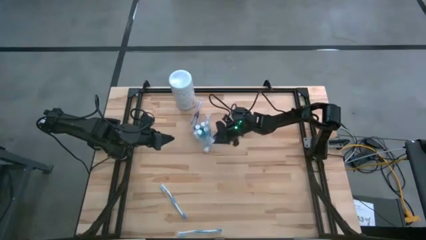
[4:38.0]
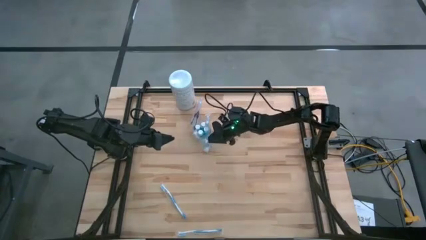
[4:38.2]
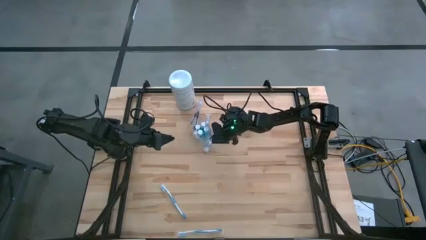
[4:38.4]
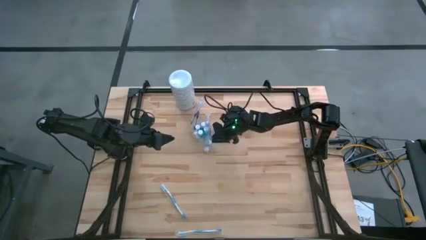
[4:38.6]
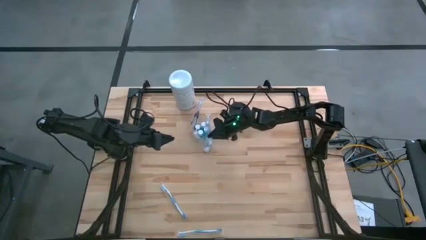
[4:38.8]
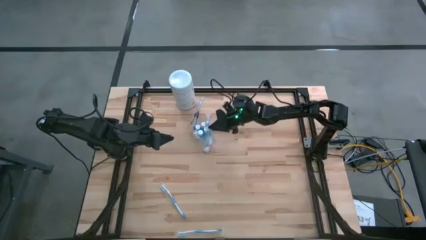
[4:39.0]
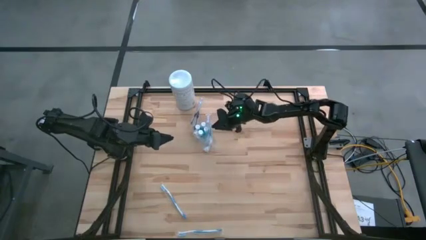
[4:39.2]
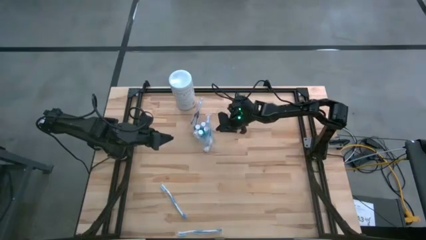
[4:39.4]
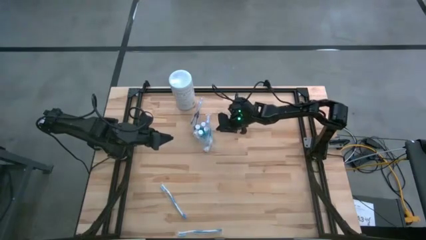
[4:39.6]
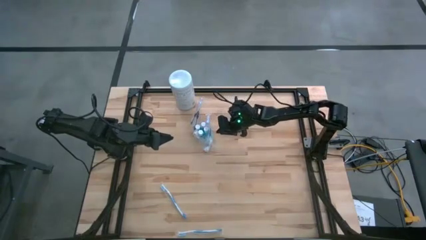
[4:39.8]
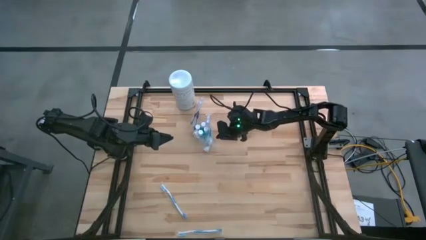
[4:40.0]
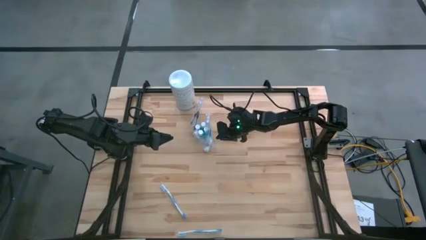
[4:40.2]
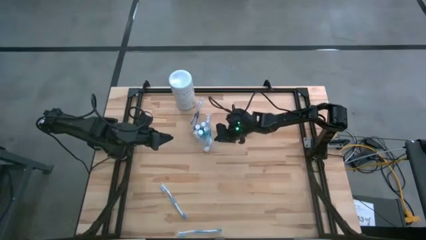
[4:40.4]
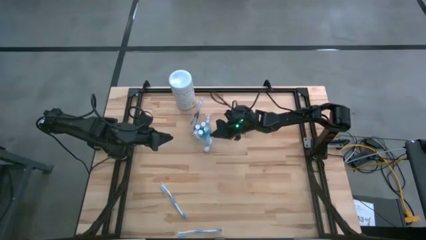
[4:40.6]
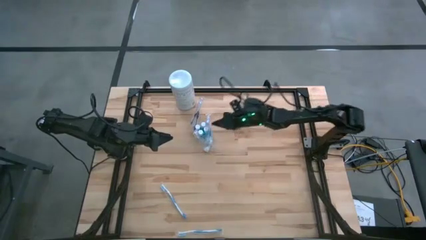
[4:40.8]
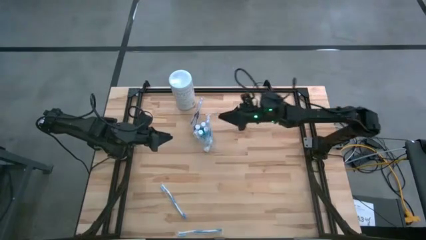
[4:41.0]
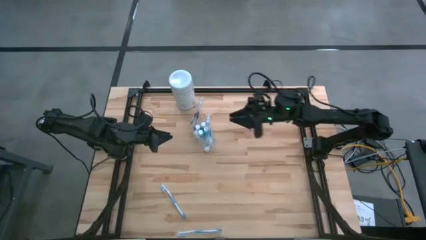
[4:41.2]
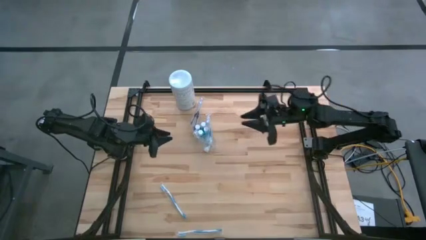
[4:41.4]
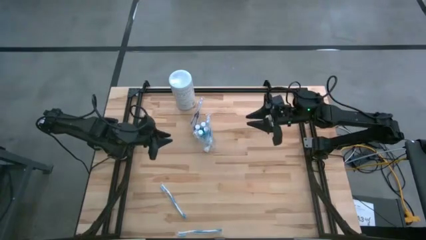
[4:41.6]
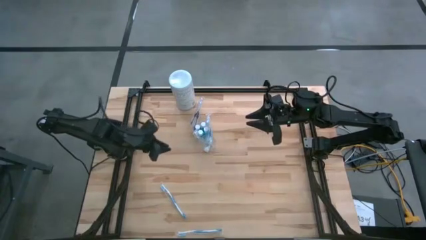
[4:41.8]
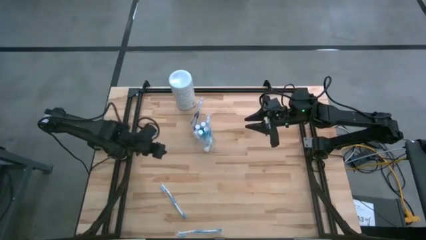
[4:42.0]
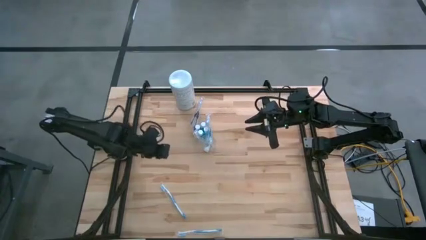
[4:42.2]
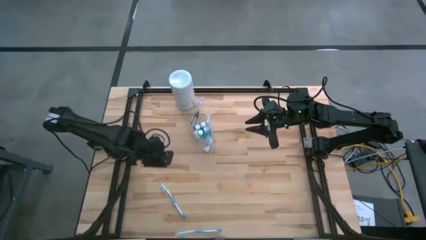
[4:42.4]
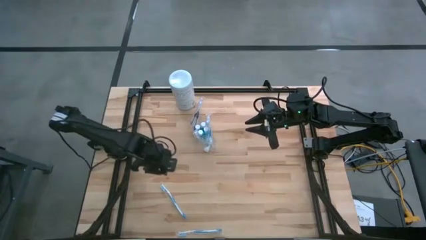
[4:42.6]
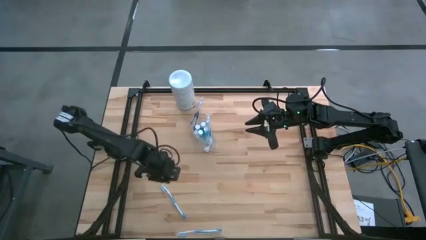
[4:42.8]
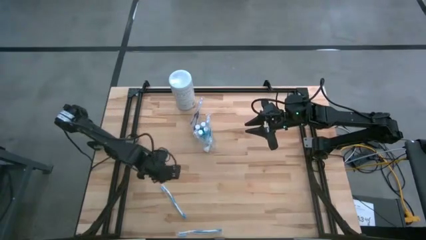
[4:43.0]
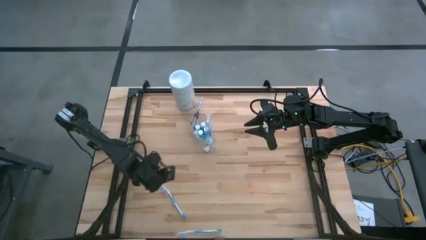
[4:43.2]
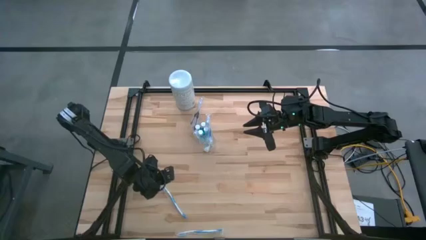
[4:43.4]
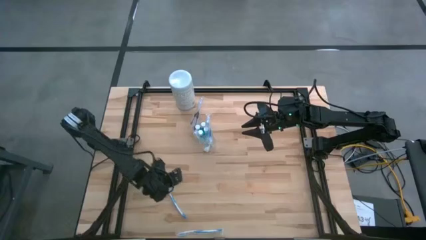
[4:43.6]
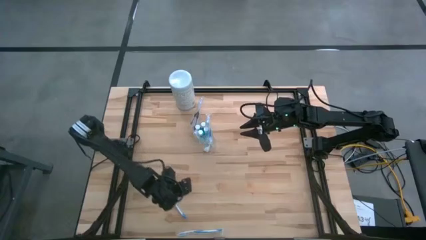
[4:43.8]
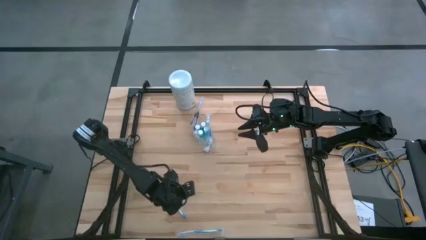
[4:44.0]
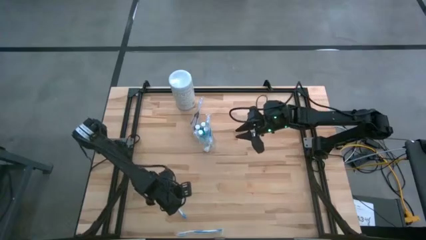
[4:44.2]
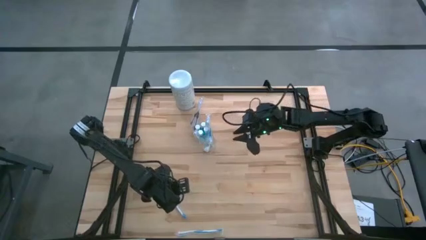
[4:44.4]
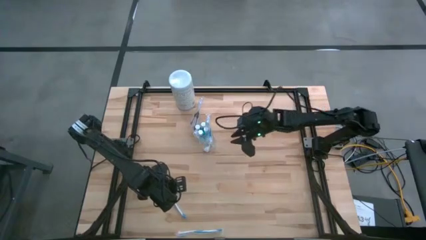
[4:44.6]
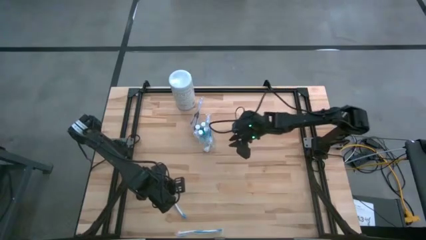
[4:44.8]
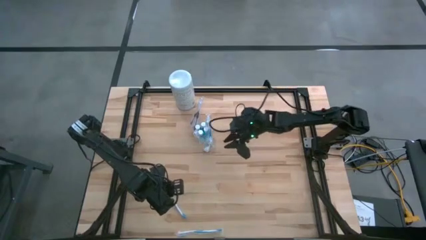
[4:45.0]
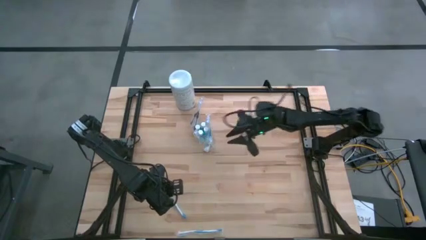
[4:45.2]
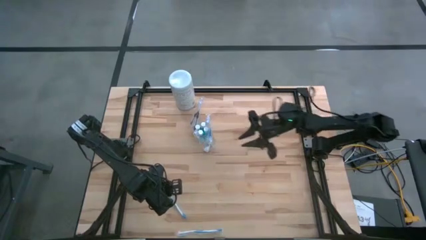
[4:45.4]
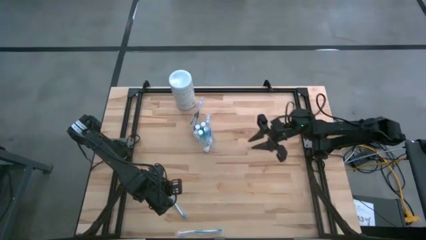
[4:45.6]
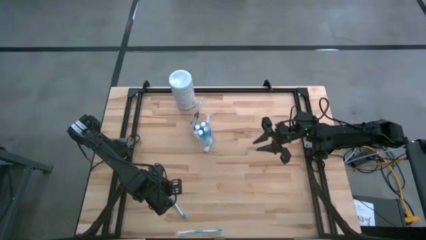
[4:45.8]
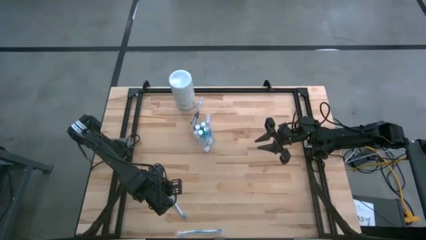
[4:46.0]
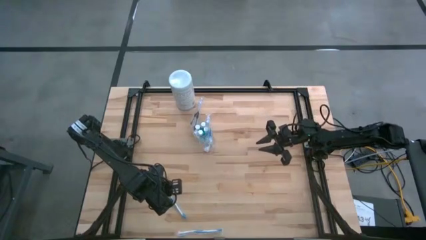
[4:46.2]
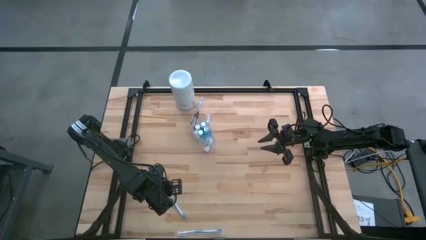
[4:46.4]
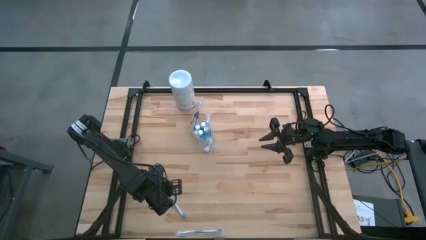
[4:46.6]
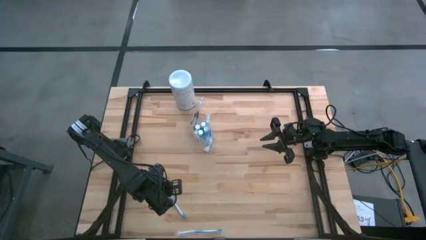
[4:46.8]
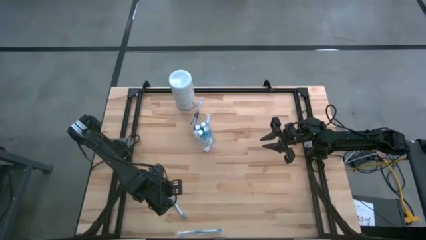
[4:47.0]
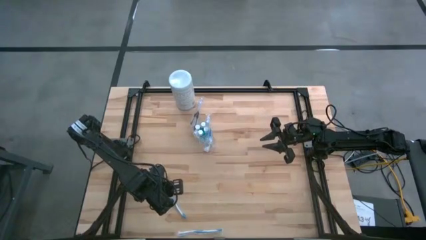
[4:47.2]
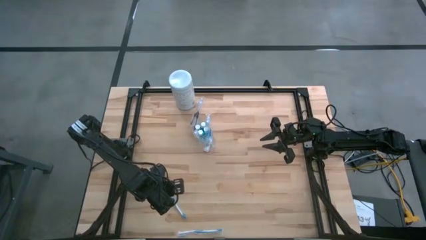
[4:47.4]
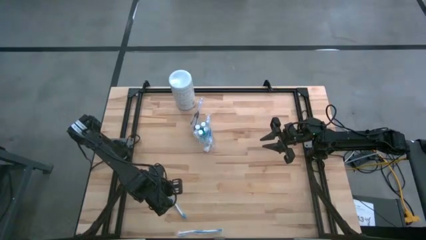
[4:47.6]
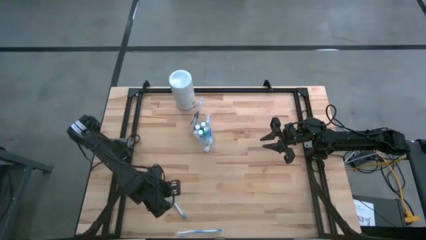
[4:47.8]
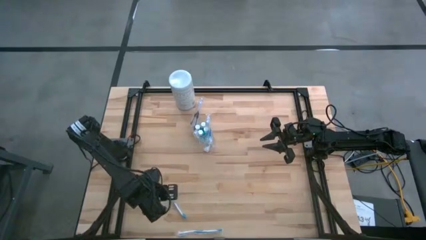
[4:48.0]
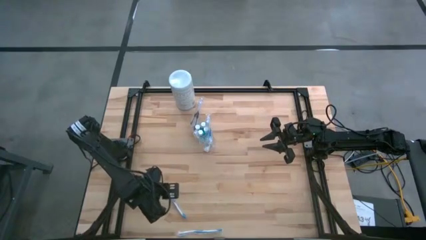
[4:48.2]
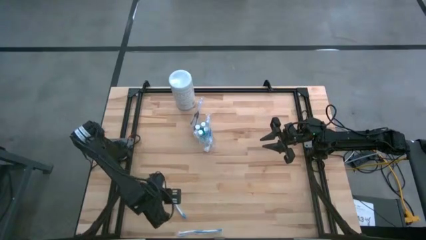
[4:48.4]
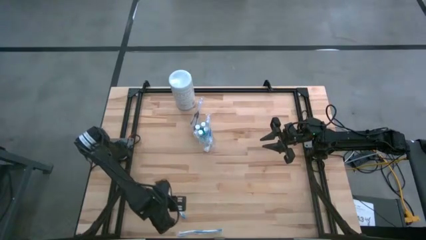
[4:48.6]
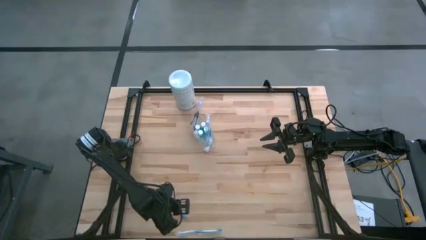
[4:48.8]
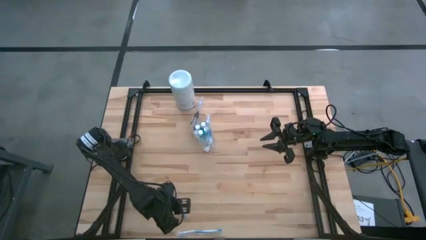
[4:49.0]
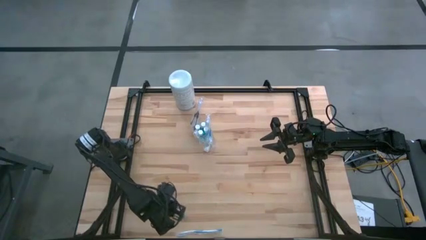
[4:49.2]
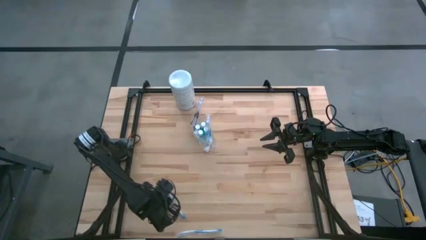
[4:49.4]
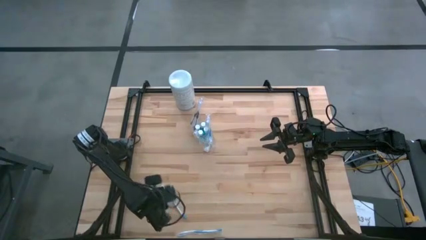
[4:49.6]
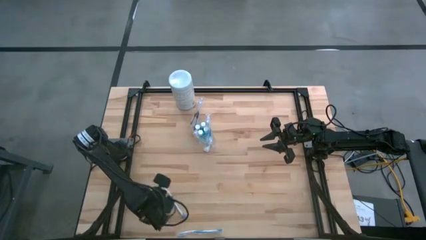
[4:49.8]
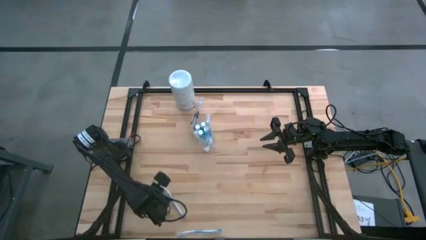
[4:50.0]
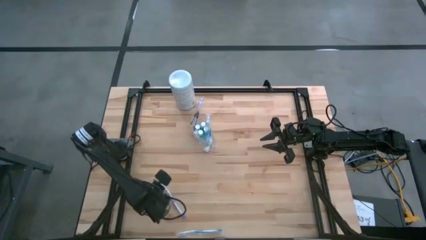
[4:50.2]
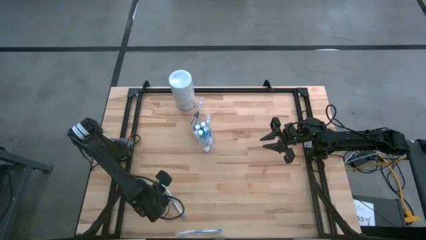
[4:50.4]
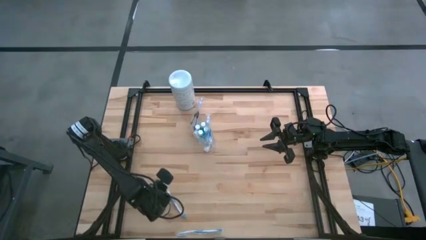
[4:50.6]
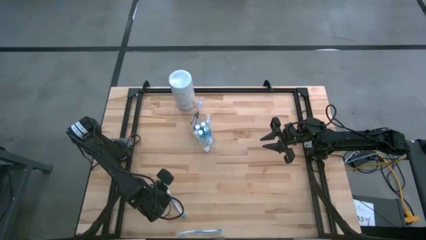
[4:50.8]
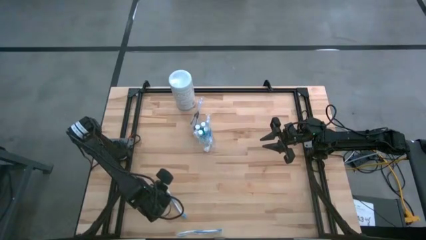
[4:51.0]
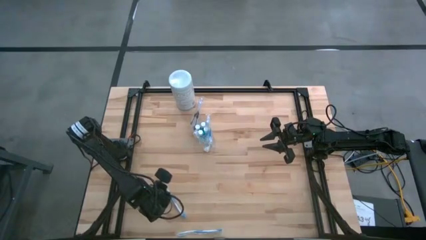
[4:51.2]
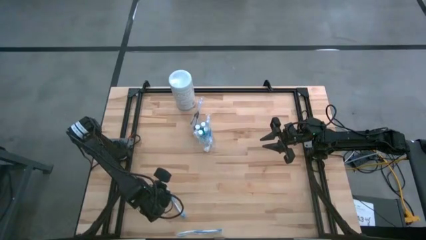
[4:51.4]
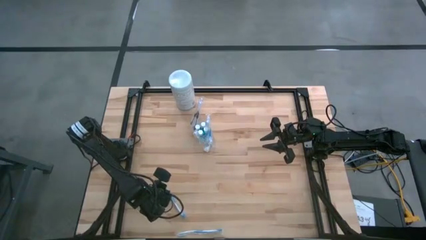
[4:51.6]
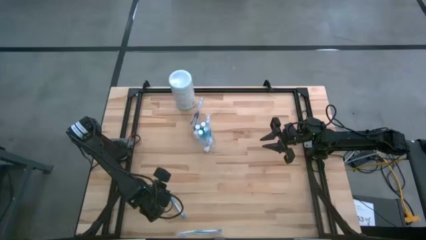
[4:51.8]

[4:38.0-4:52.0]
Task: Pick & Place toothbrushing station
Put the blue toothbrush into the right of the transparent organizer

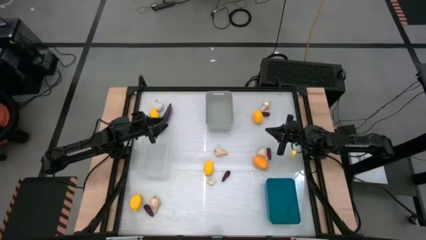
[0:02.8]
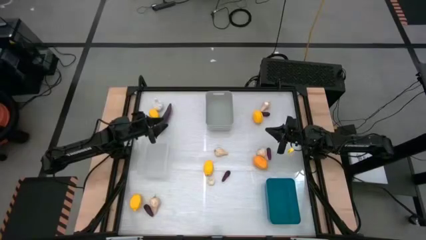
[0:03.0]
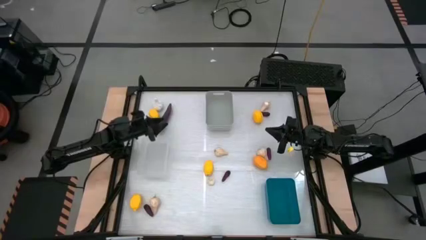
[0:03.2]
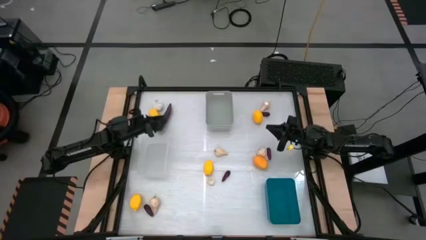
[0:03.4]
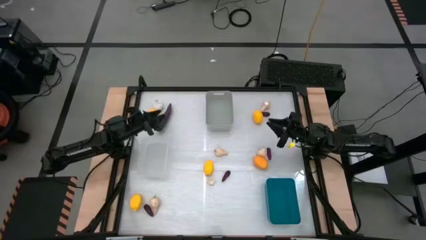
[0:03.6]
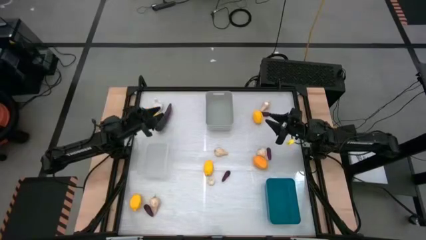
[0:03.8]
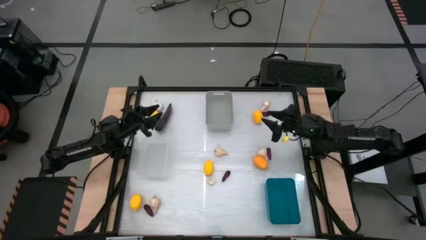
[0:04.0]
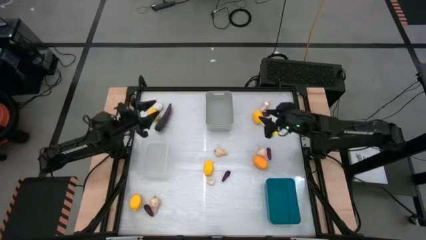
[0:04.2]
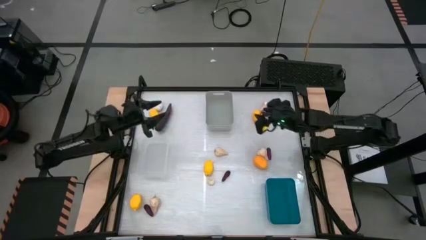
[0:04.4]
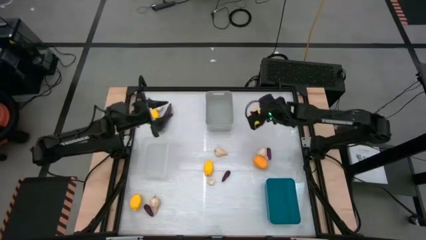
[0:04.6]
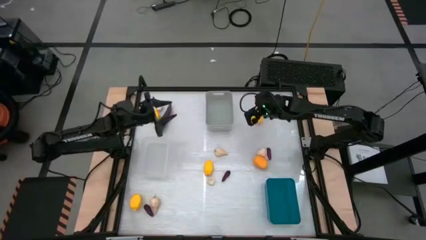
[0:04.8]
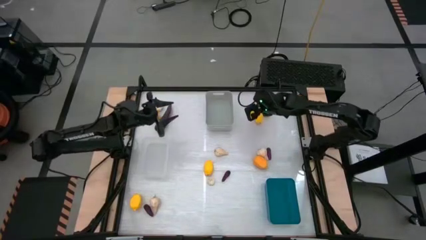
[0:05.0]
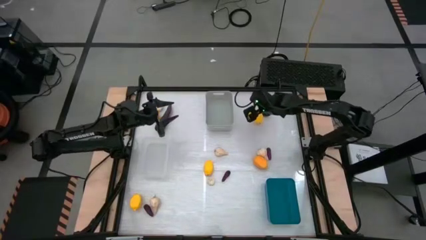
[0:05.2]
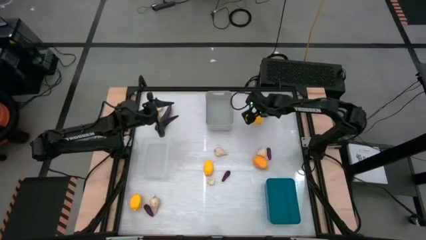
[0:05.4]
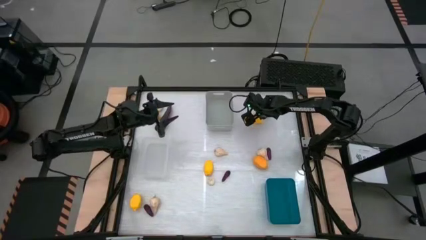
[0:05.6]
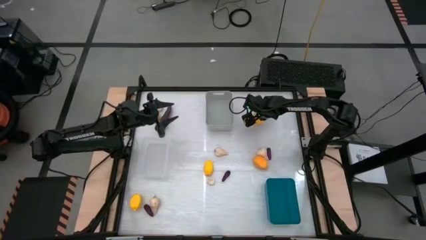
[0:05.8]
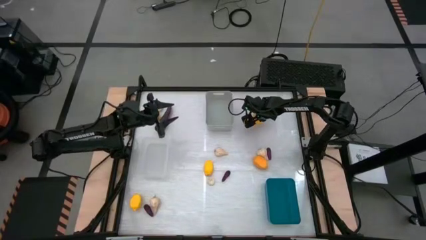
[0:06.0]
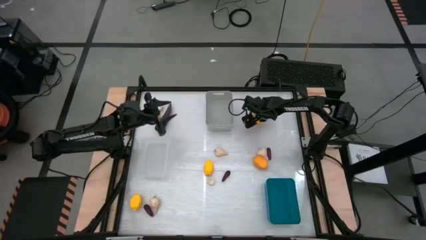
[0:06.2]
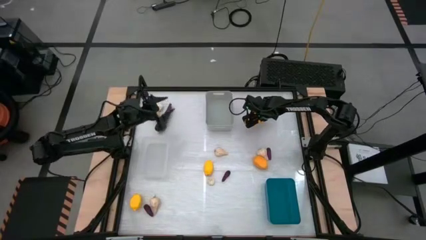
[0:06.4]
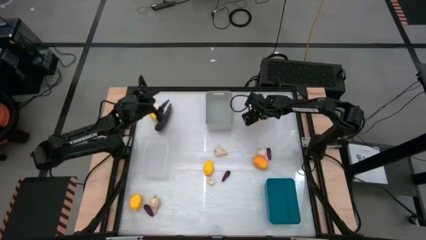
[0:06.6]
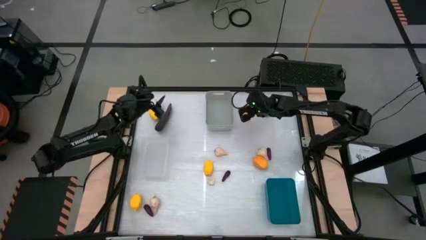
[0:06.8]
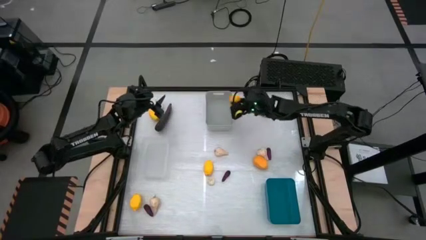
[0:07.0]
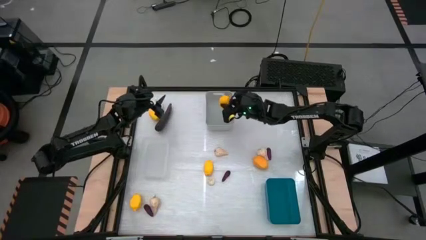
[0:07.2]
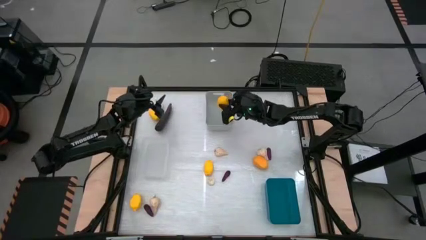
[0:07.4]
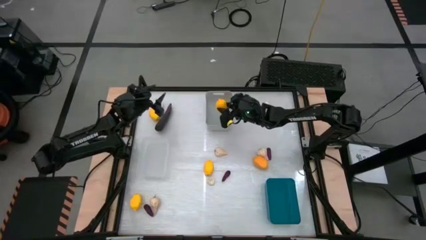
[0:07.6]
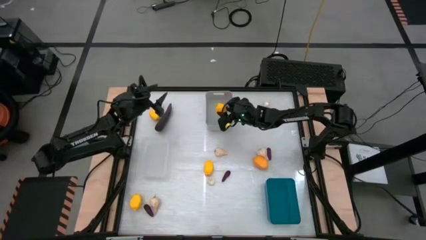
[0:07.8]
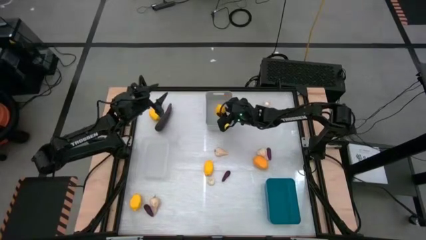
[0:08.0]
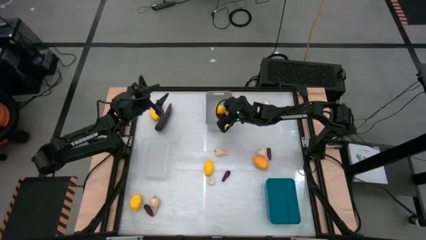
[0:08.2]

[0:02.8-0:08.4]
Task: Sort produce into baskets
Put the lemon into the gray bin
